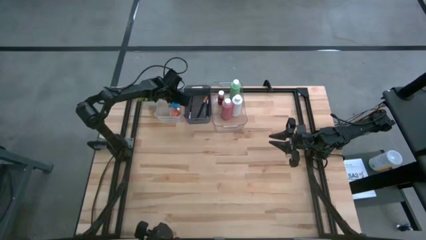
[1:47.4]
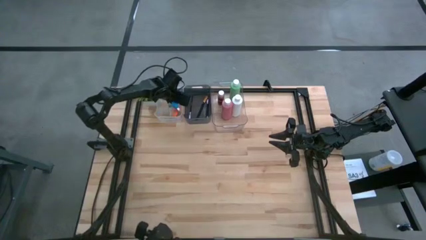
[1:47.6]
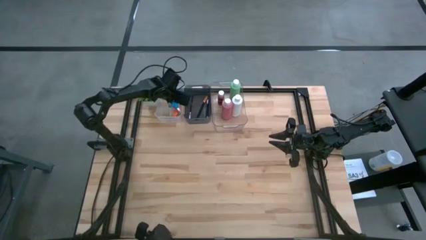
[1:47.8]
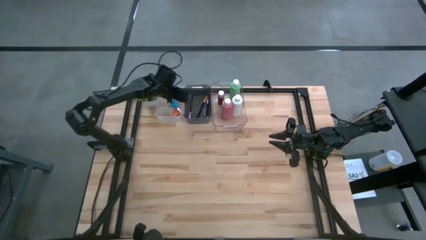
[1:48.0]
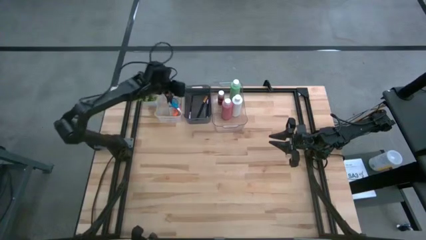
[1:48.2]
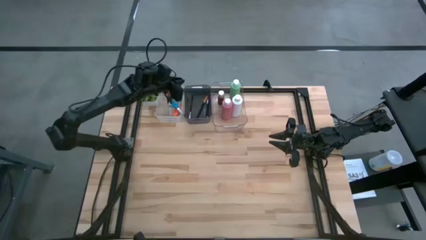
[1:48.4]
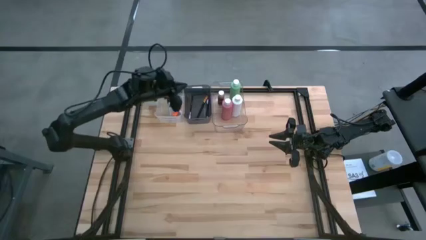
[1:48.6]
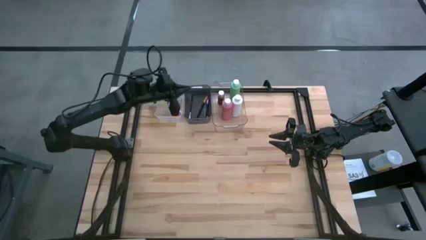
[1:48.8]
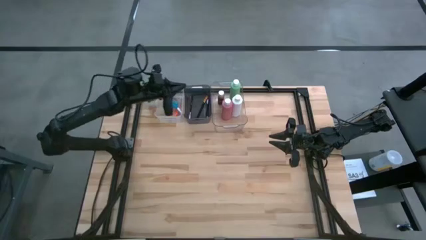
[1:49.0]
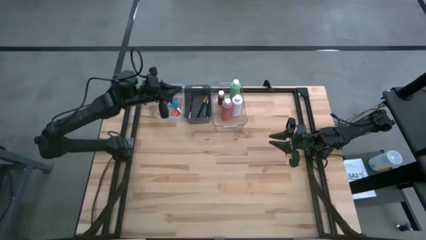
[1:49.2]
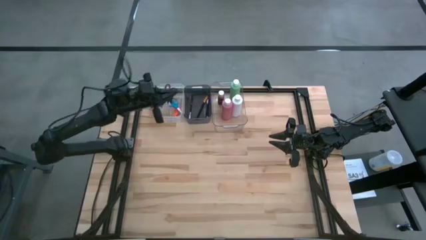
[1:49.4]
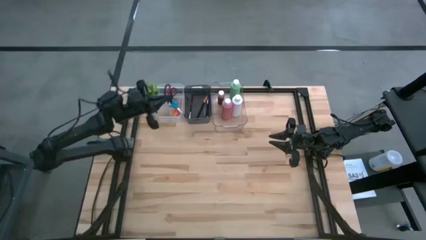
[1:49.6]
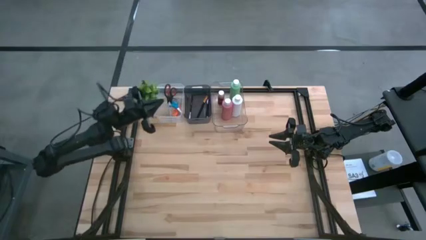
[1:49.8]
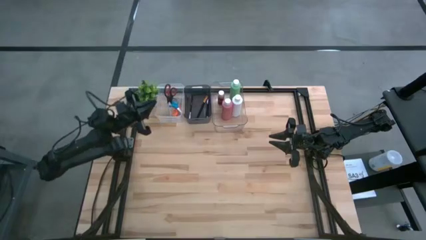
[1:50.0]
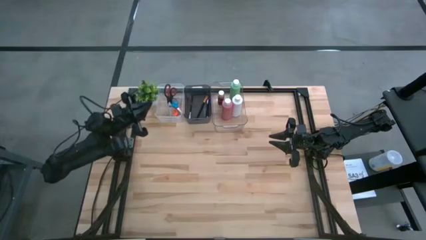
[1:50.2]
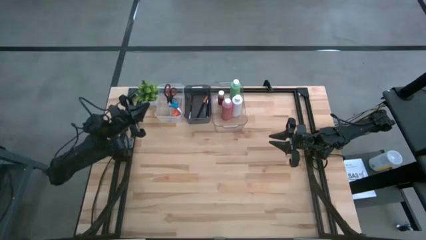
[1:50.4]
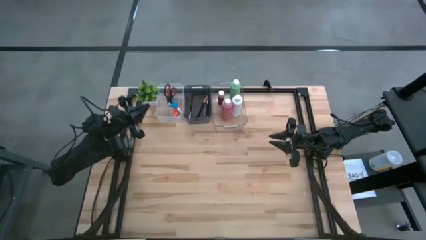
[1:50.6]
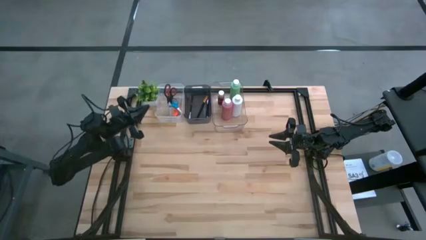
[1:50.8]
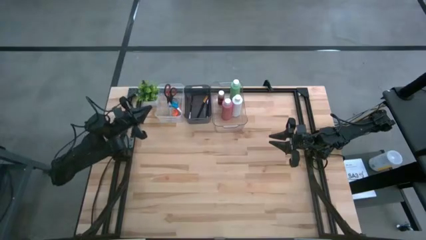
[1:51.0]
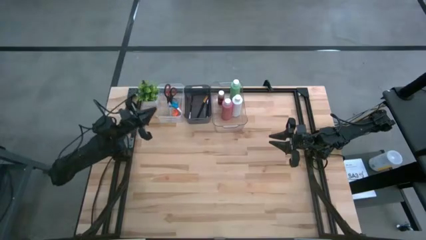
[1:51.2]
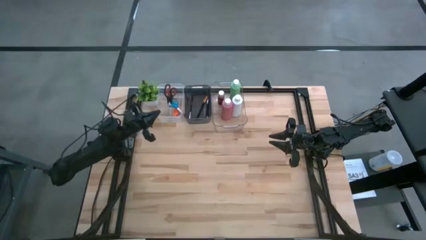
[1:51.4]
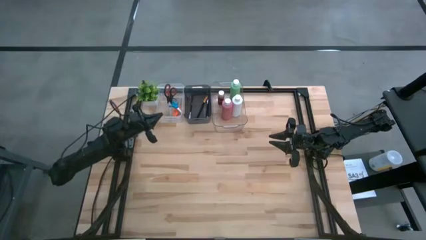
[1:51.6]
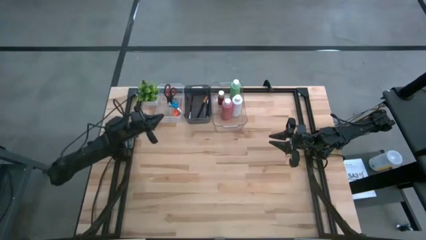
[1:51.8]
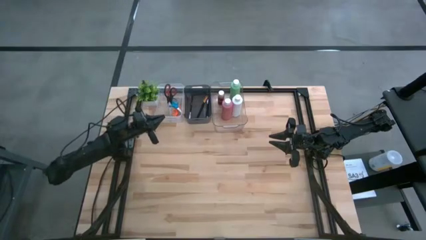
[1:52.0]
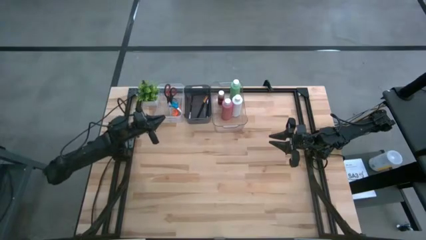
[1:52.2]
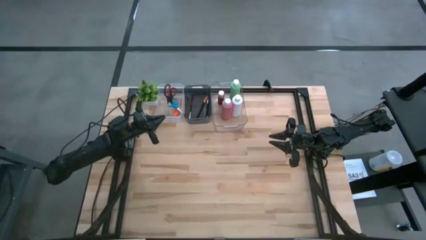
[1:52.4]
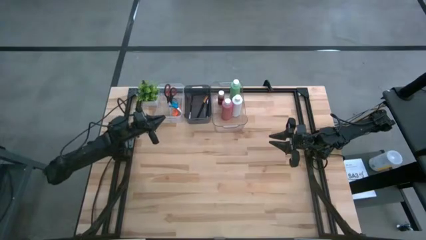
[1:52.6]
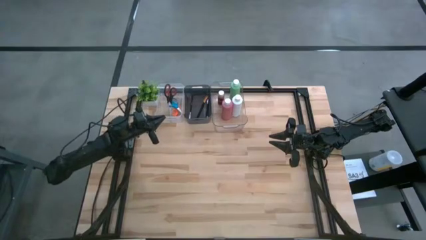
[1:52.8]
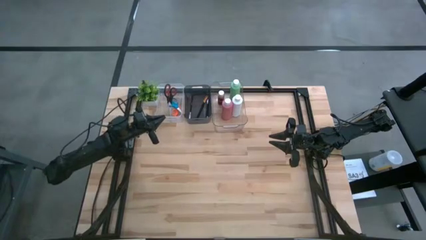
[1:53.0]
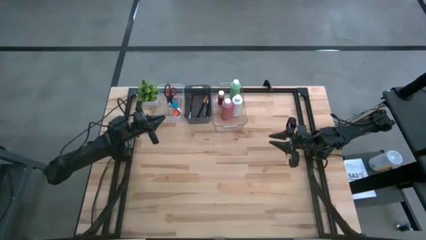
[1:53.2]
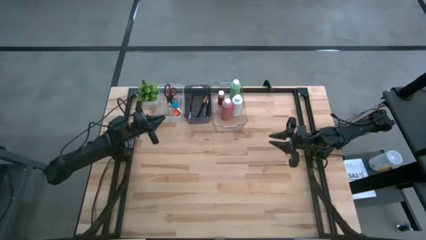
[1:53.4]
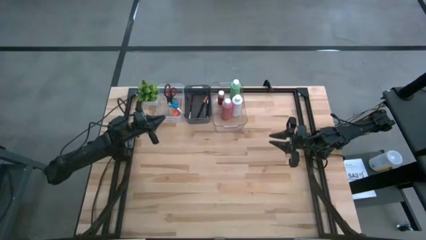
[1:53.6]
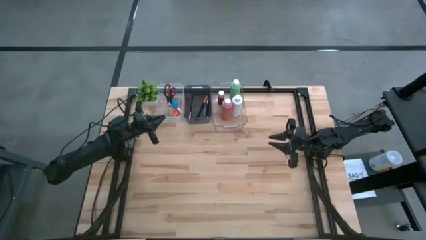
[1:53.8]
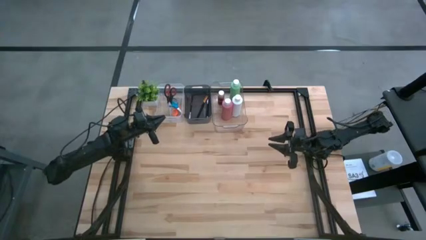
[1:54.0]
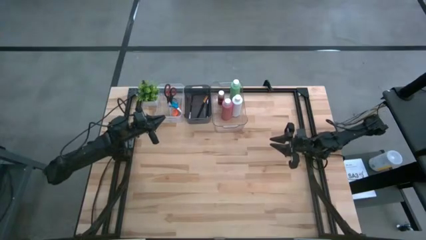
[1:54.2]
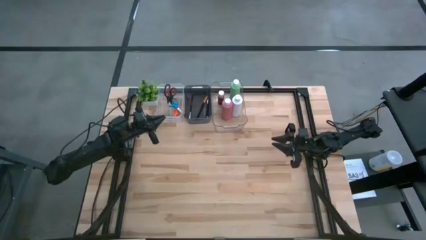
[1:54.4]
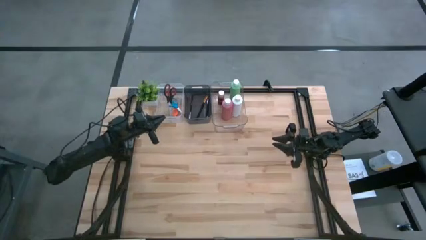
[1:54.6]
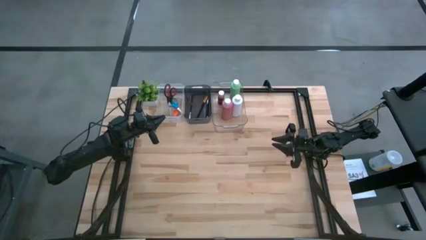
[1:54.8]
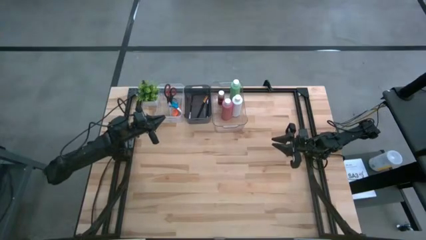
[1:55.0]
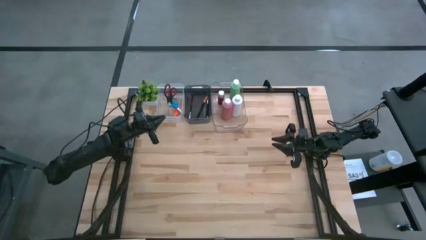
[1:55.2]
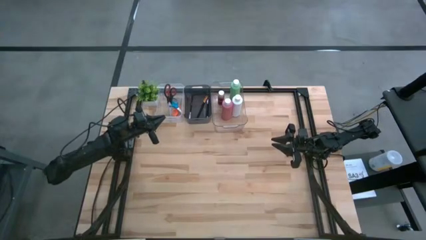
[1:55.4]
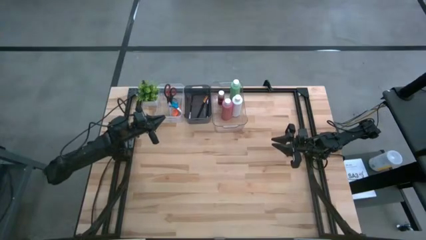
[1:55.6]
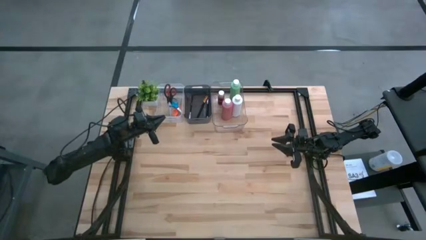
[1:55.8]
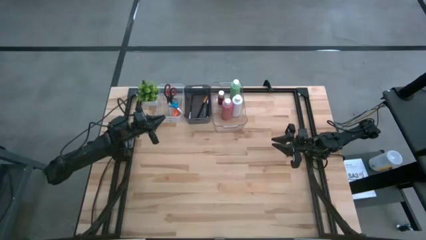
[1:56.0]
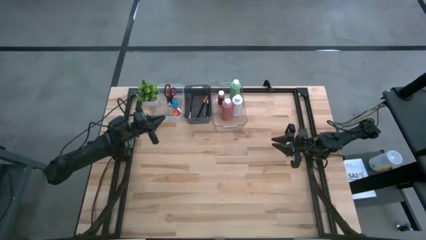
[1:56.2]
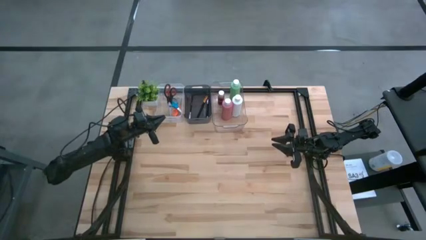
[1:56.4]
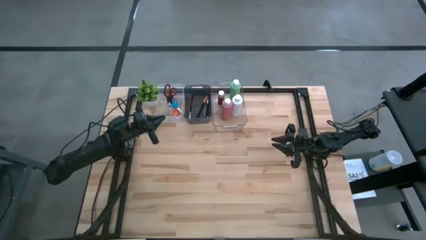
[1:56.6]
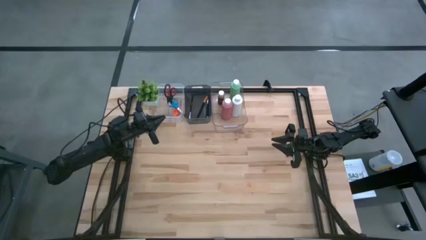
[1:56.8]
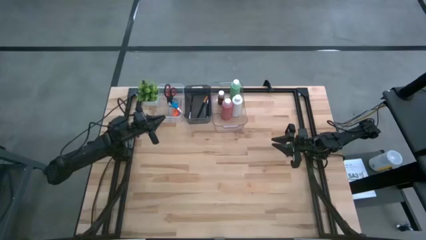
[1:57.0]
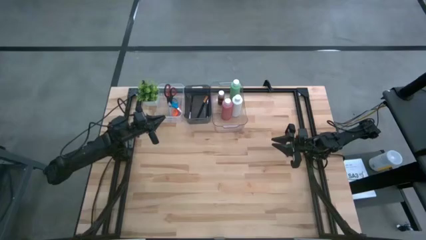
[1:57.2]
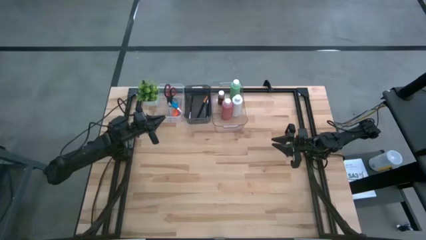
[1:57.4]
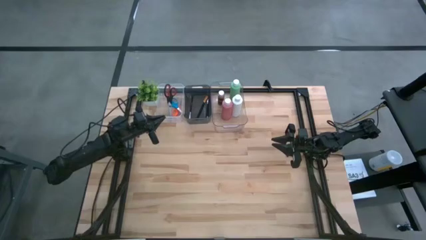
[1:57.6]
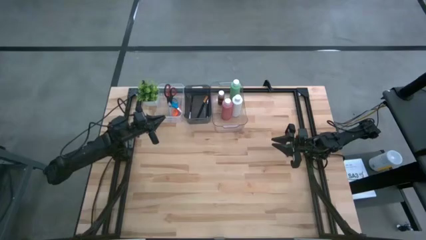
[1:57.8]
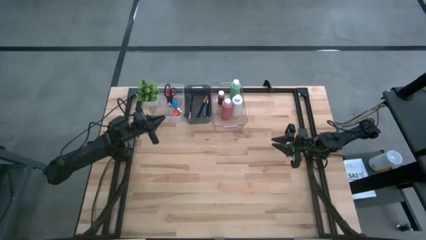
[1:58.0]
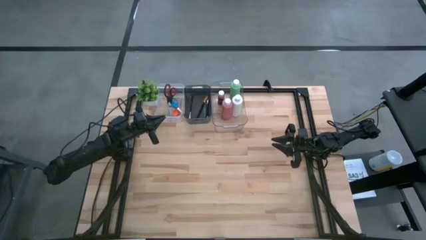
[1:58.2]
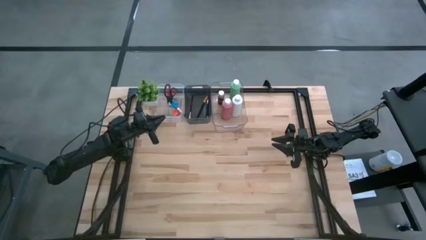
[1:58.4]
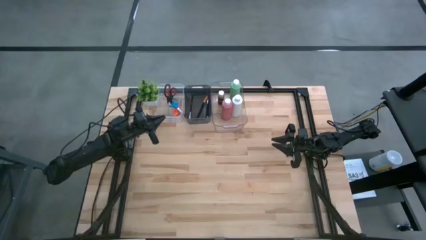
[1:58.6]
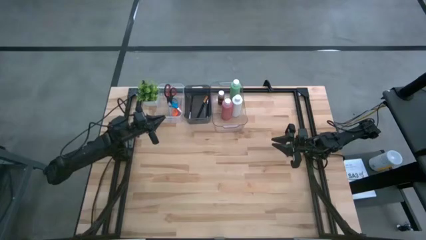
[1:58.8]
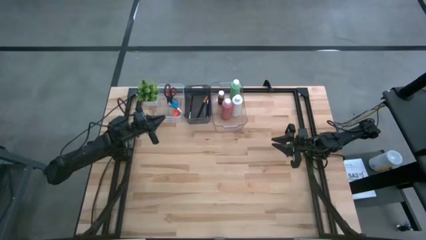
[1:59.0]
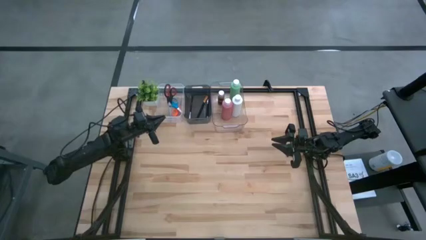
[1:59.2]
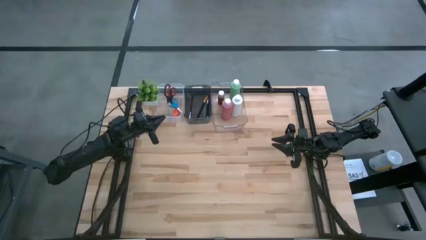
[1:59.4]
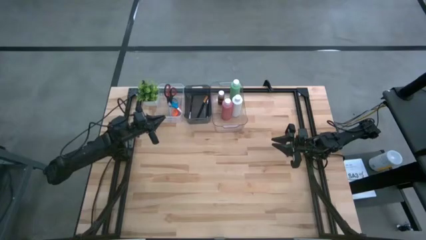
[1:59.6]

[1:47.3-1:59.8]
Task: Pick & Place Paint Supplies
Return to Home Position

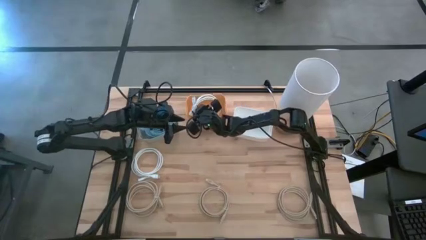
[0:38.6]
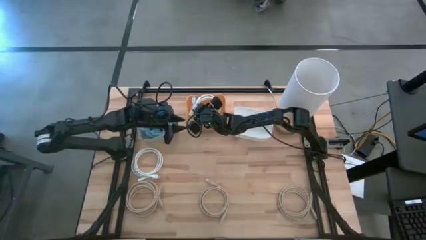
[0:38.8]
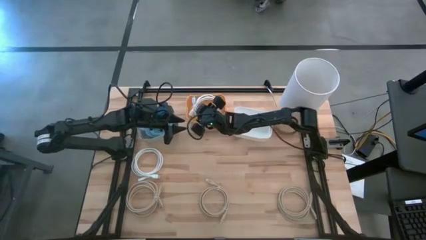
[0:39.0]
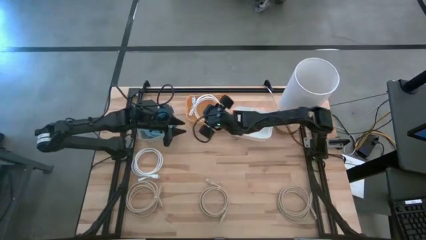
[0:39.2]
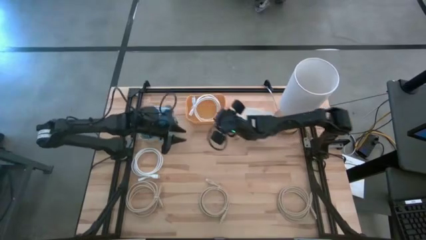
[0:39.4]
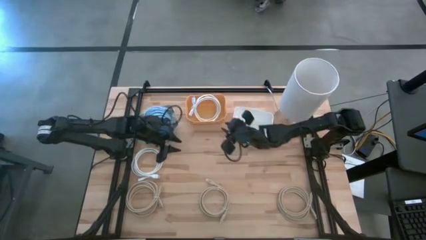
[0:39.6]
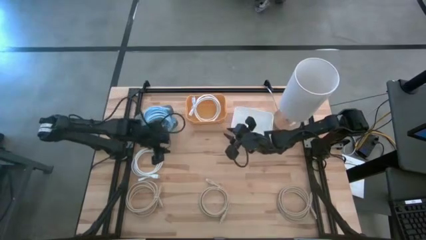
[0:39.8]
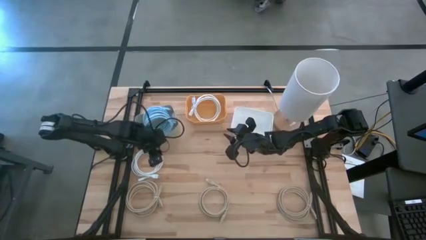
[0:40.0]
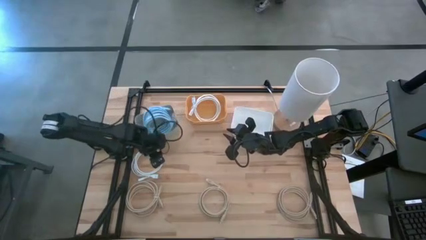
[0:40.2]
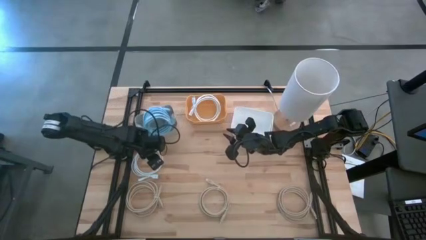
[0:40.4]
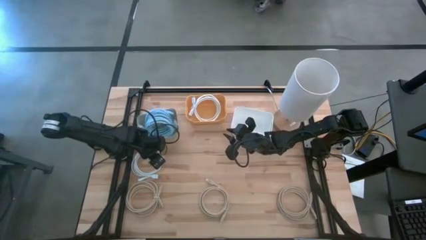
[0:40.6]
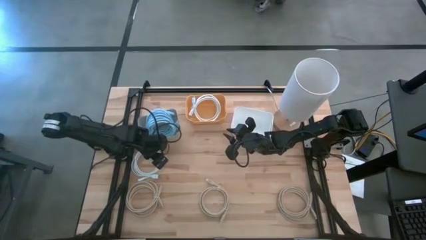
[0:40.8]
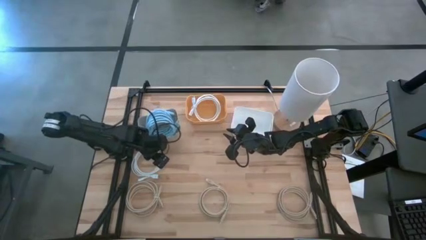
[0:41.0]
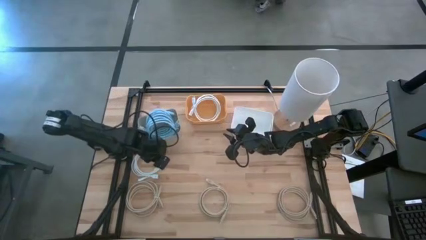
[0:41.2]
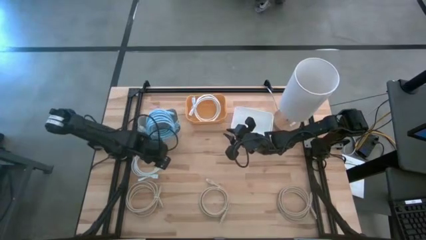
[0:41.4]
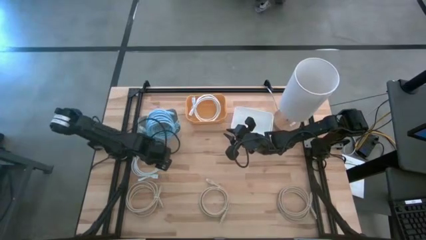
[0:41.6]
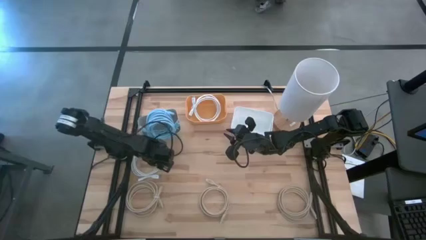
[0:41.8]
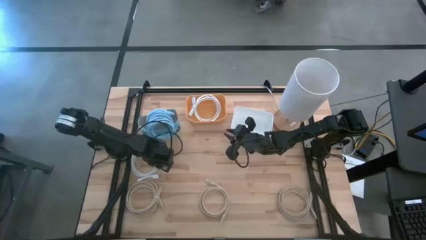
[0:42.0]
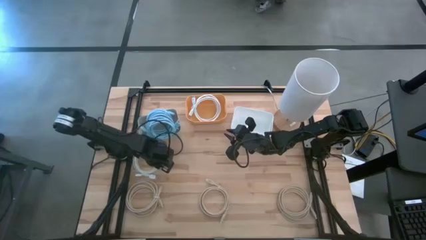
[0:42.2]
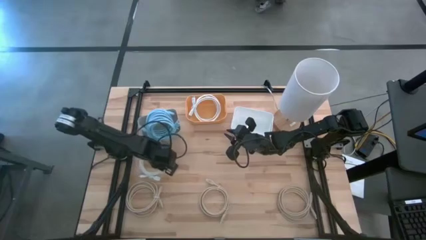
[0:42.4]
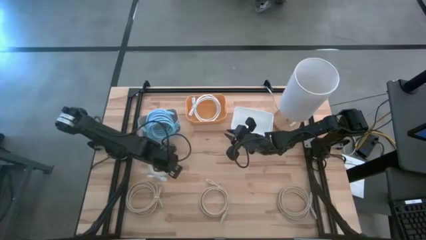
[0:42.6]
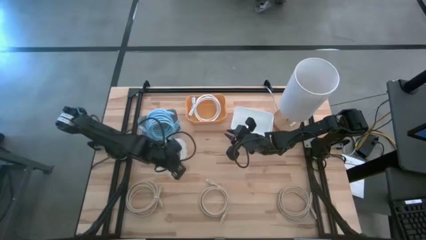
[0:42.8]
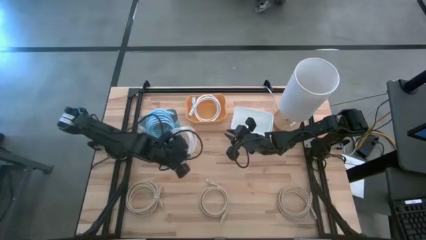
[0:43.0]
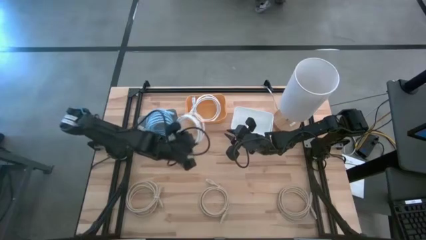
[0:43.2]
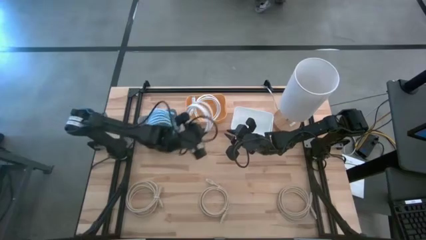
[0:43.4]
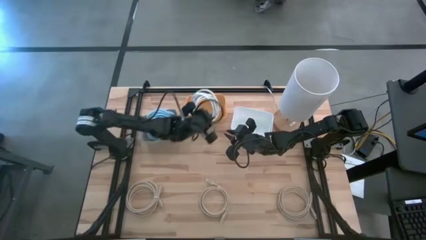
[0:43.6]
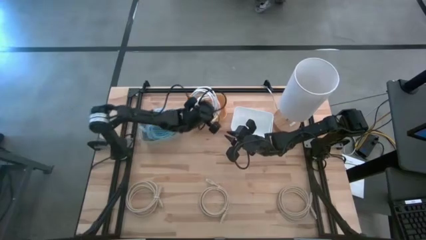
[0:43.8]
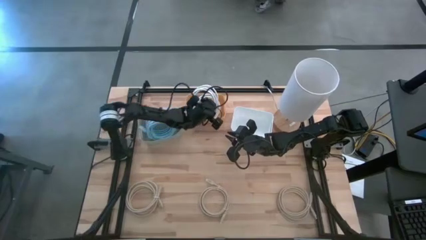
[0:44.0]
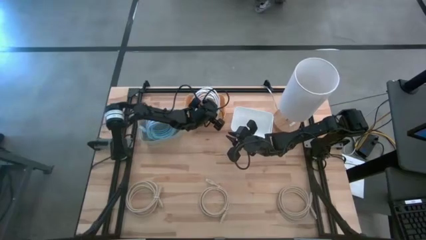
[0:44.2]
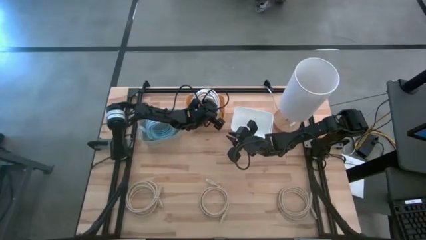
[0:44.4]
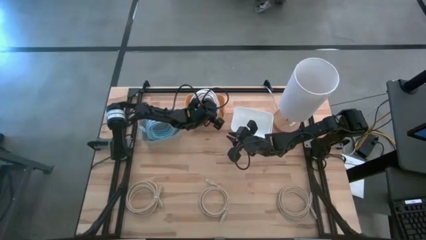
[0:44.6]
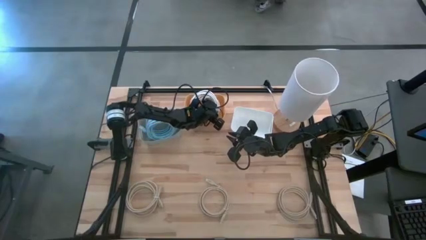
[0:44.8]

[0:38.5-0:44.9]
Task: Sort HDMI cables
Put the white hdmi cable into the orange bin
